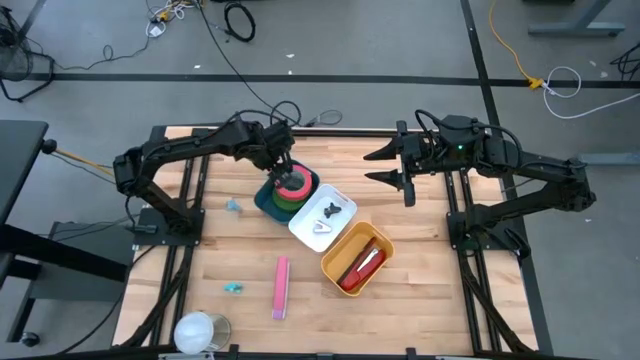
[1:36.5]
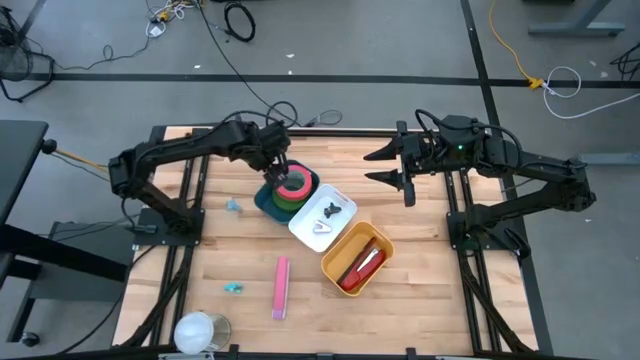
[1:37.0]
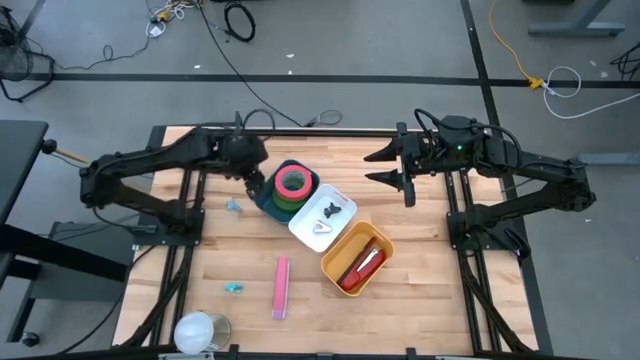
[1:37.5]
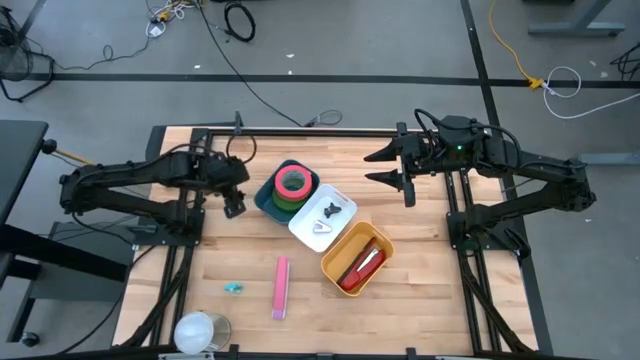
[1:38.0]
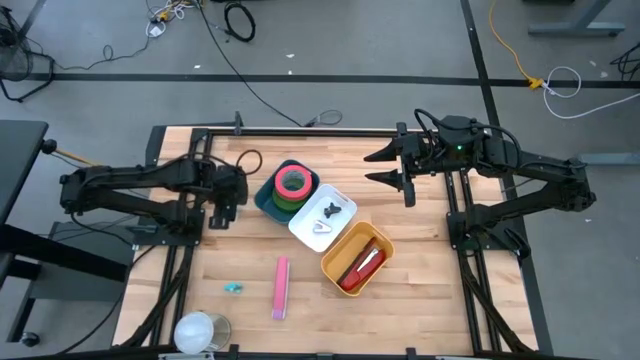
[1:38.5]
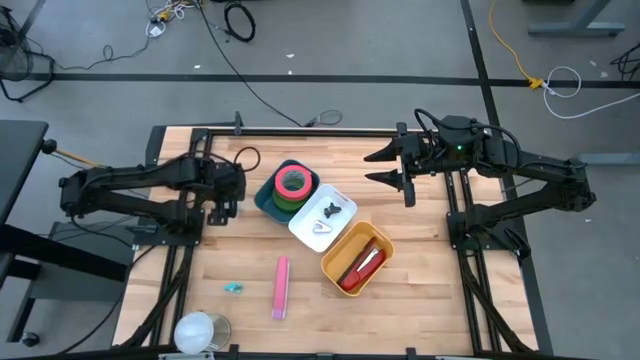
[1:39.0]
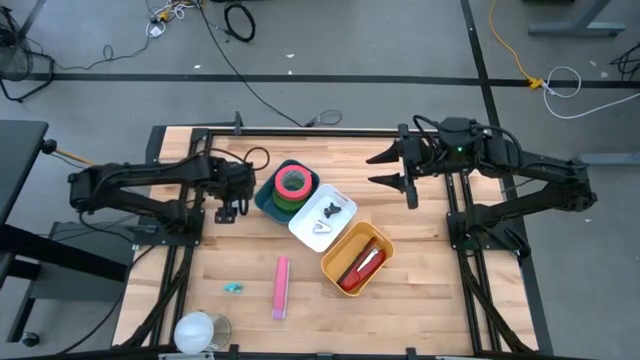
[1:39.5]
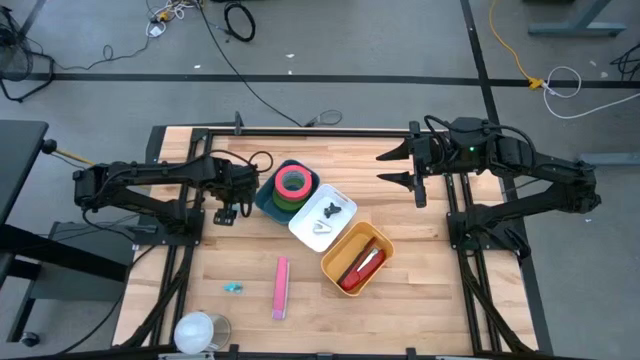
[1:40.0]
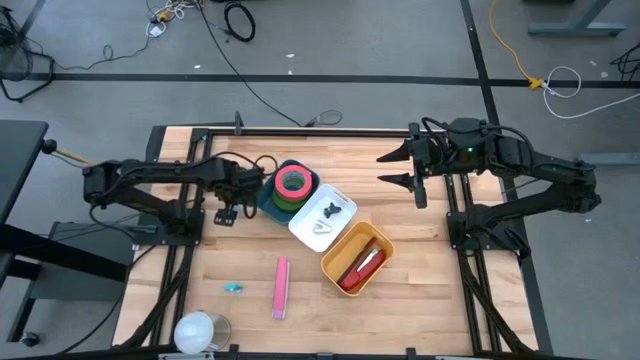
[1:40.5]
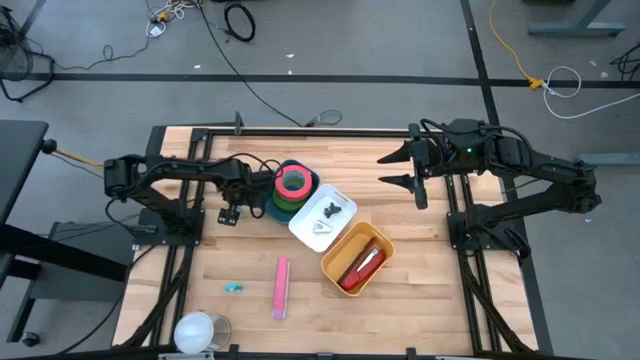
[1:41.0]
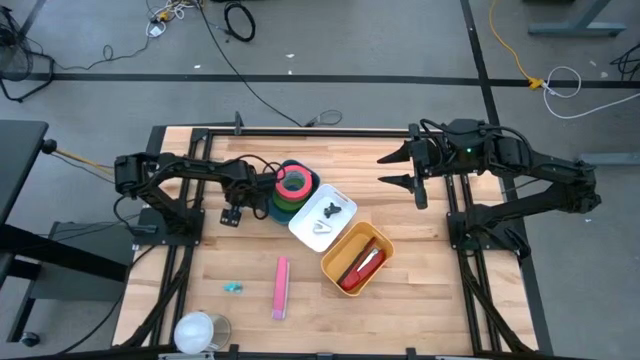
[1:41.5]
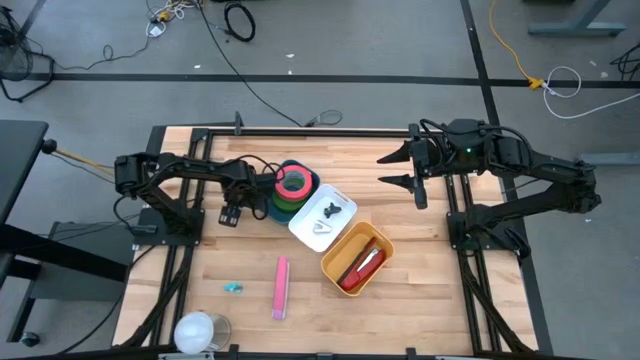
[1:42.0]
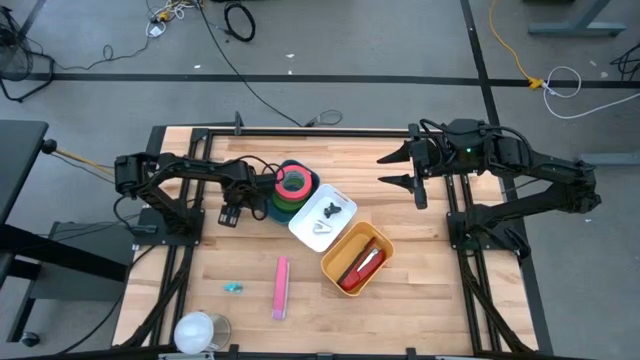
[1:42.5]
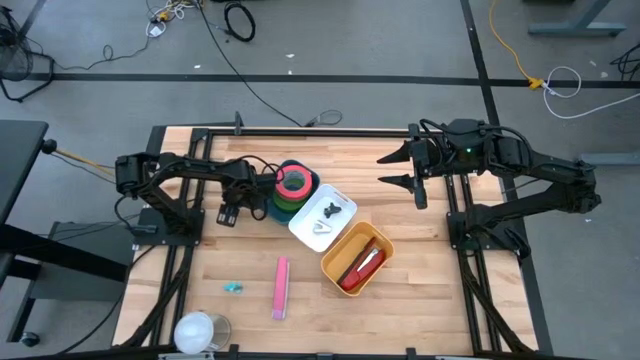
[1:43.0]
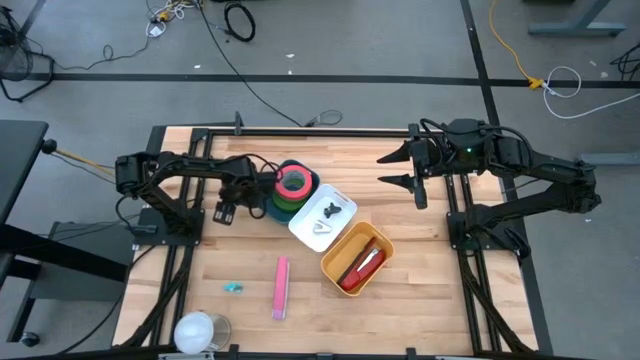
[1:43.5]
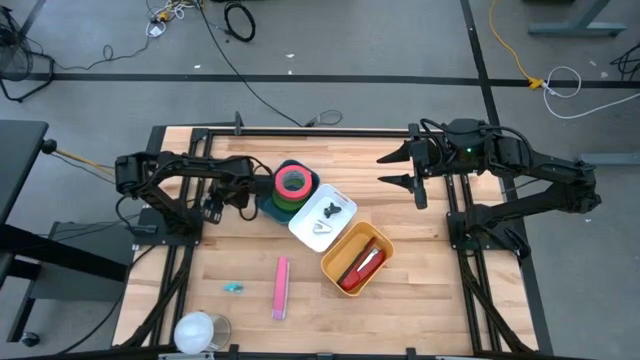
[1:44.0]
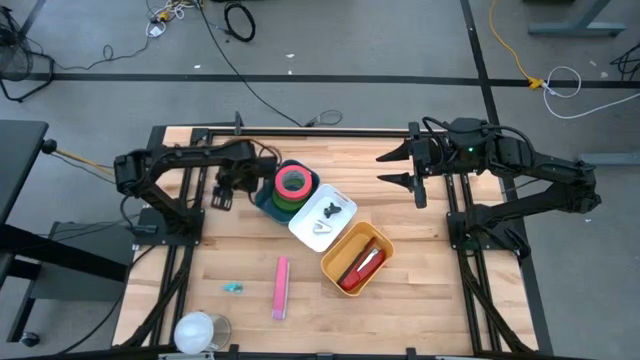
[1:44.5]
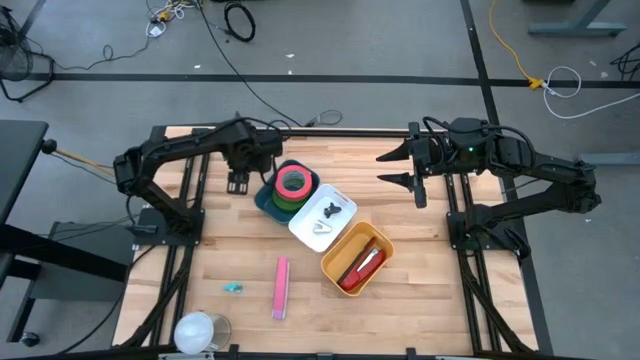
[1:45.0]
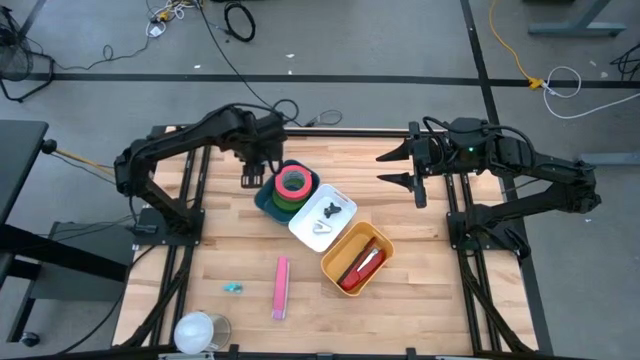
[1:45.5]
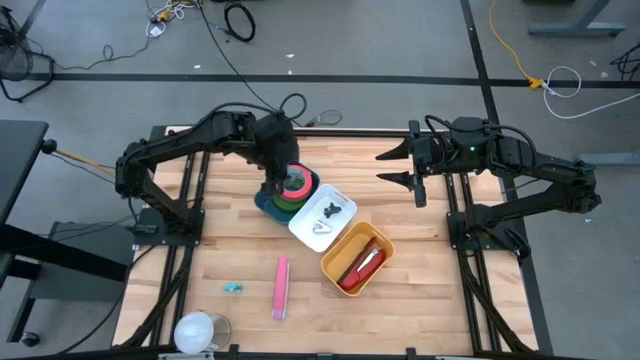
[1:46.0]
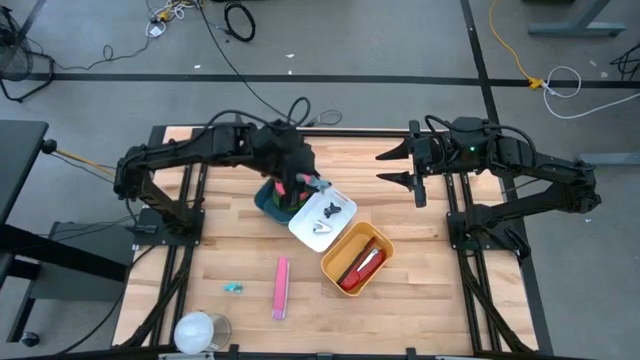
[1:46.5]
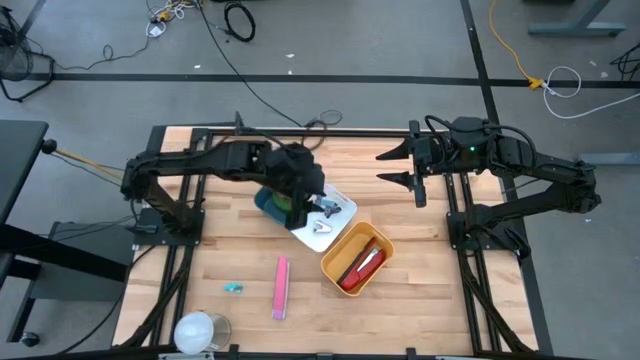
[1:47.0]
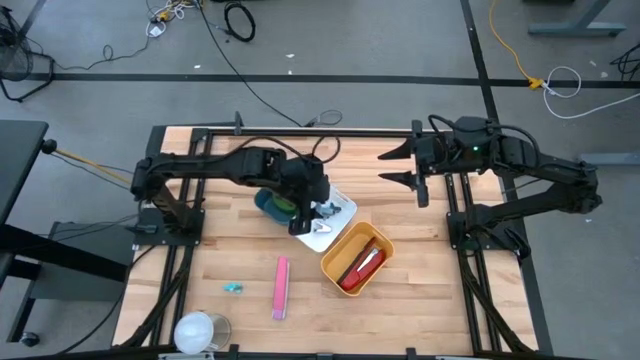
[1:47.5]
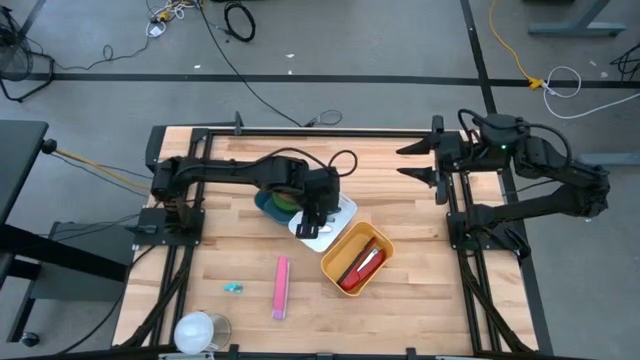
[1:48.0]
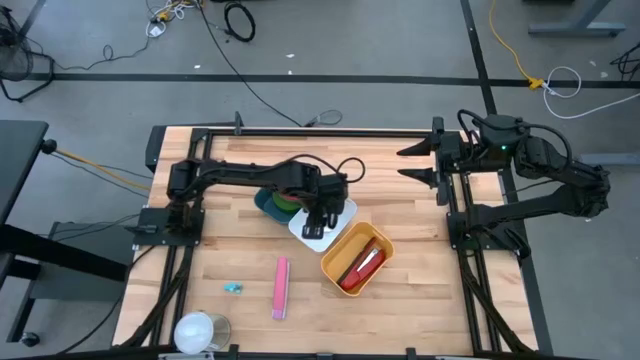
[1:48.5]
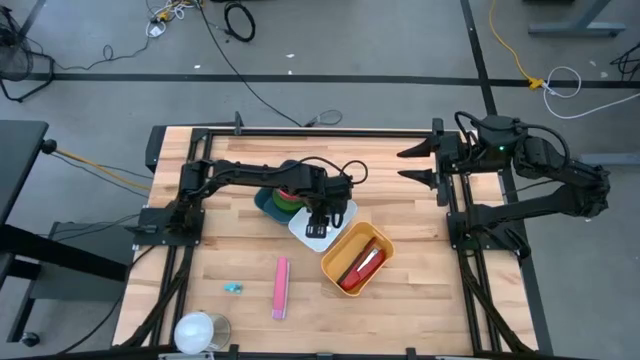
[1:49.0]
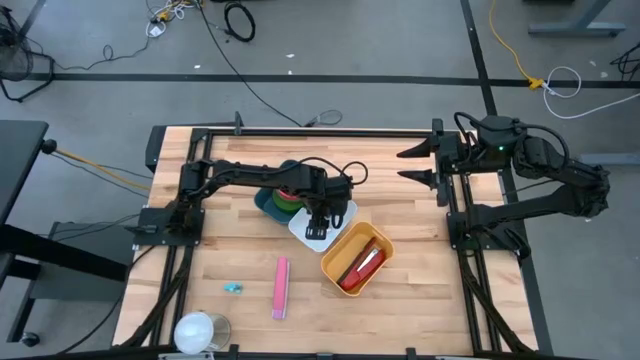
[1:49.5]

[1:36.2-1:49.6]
Task: Pick and place Stapler, Stapler remover, tape
Put the light blue staple remover into the white bin

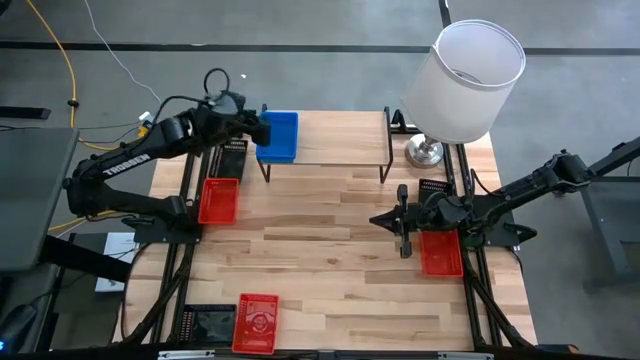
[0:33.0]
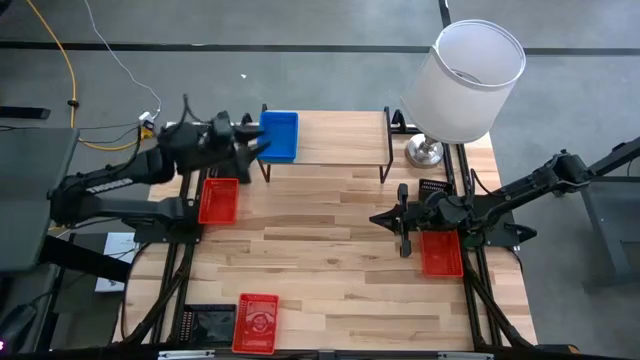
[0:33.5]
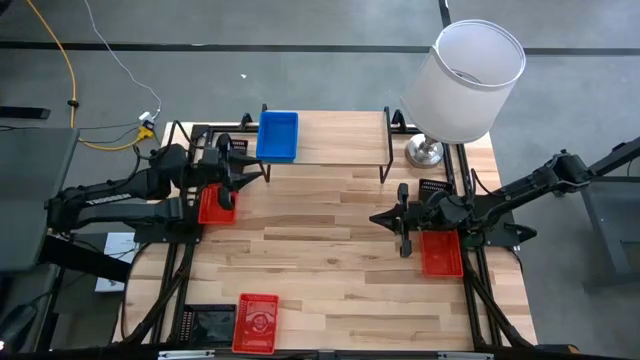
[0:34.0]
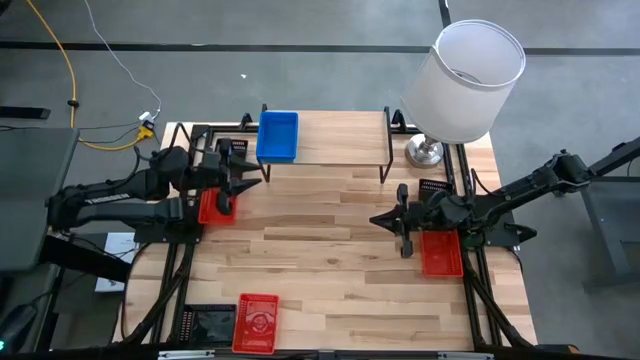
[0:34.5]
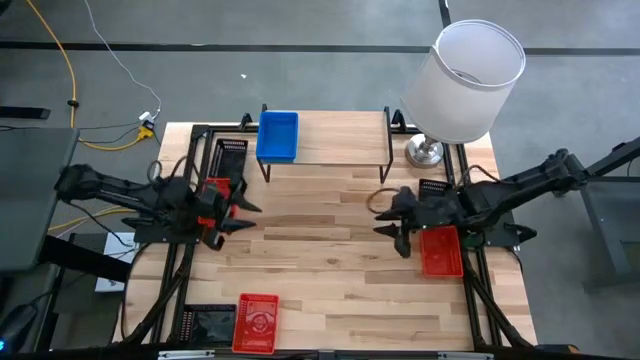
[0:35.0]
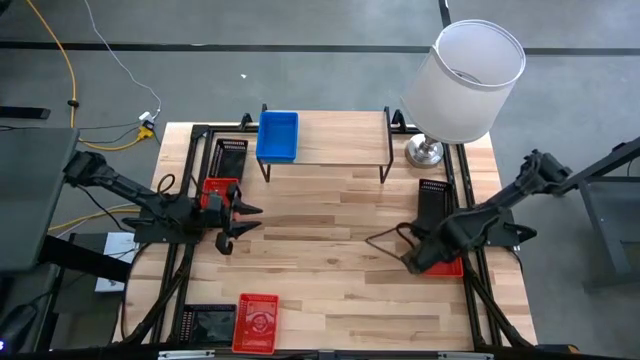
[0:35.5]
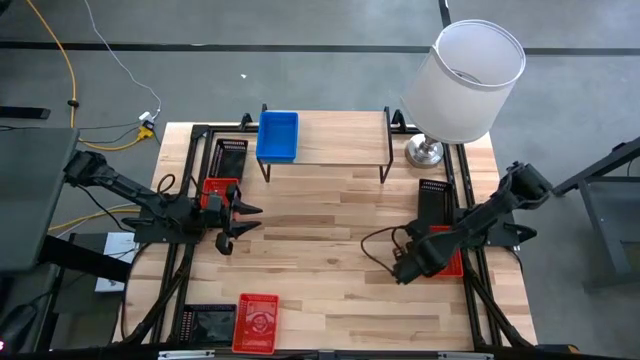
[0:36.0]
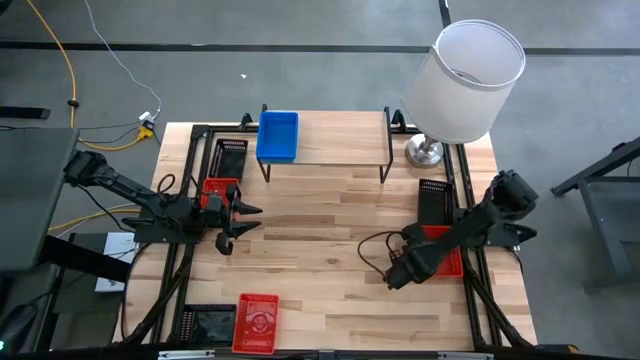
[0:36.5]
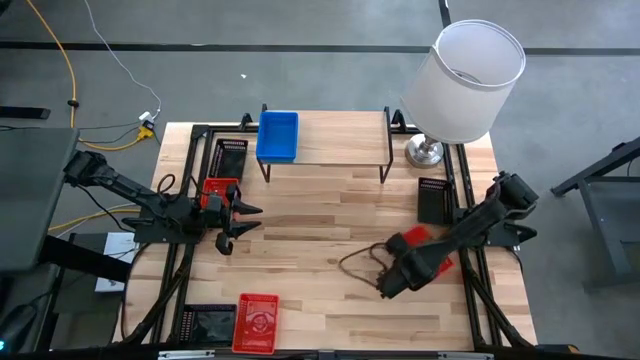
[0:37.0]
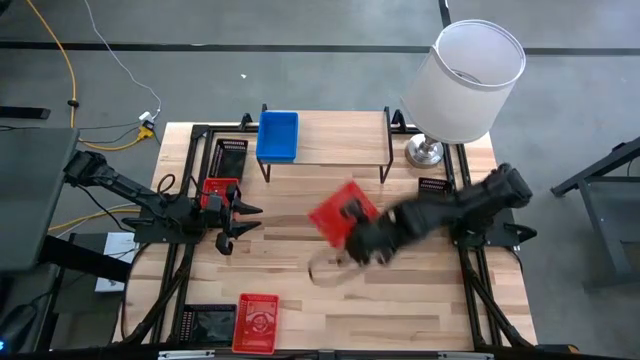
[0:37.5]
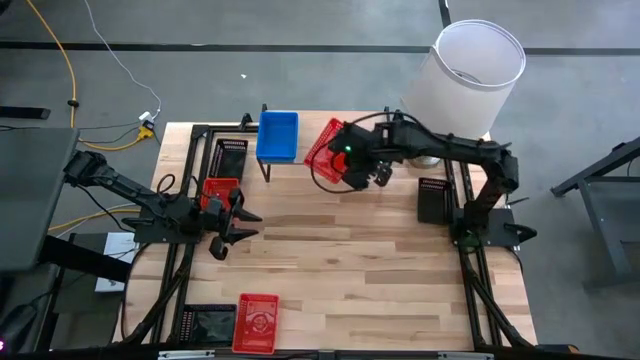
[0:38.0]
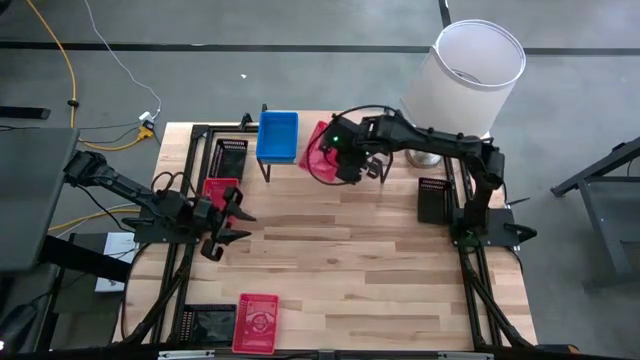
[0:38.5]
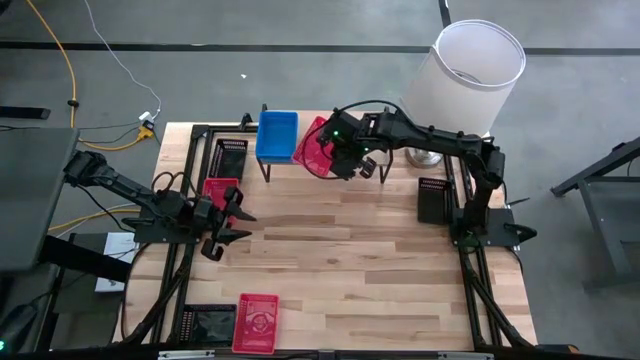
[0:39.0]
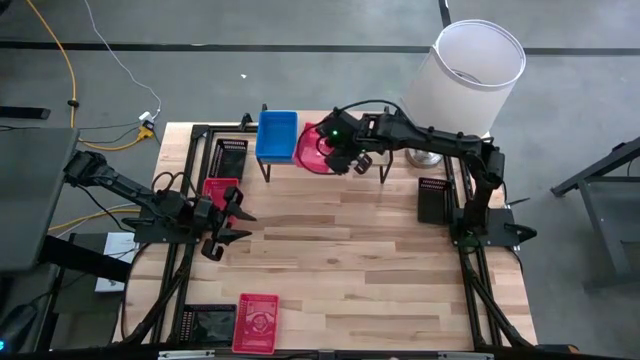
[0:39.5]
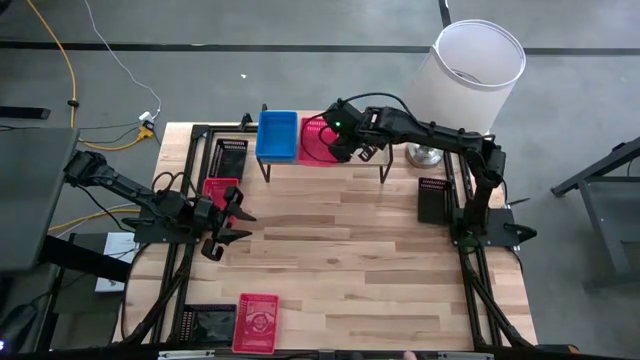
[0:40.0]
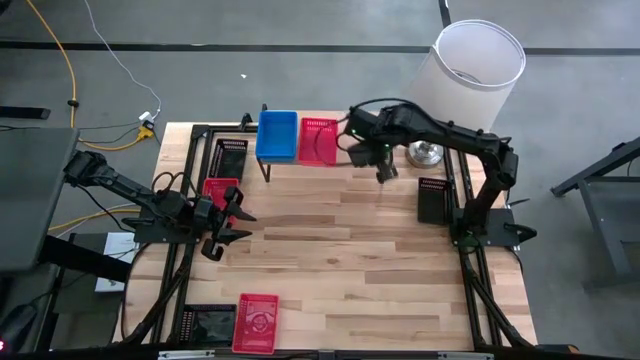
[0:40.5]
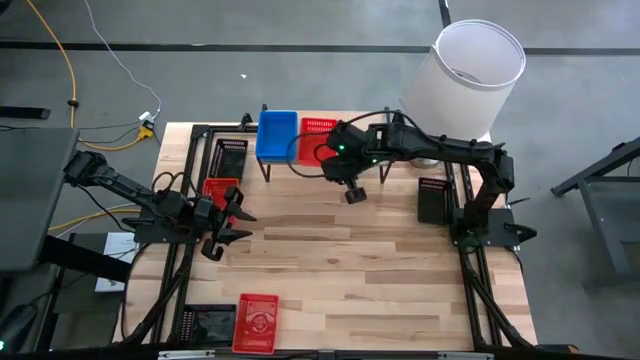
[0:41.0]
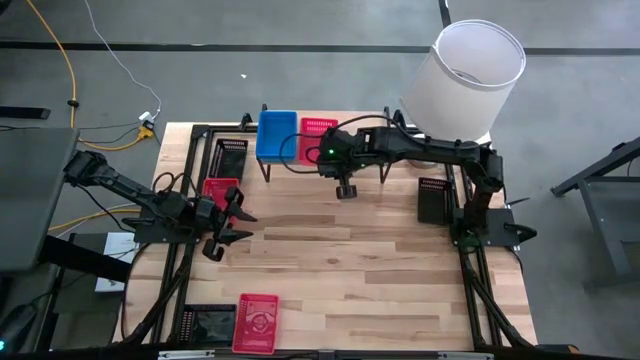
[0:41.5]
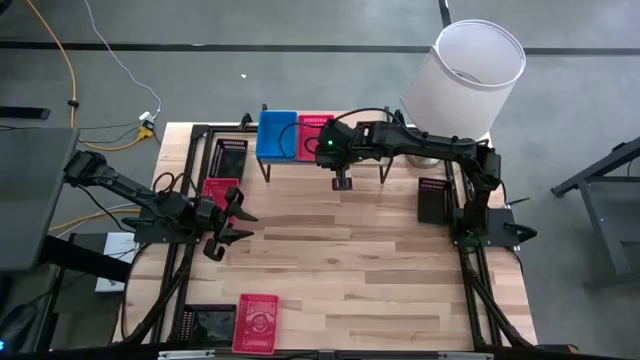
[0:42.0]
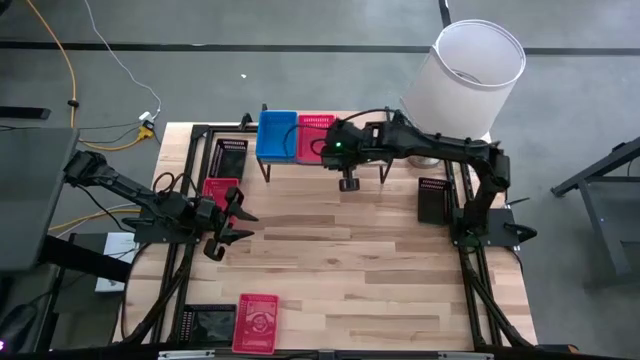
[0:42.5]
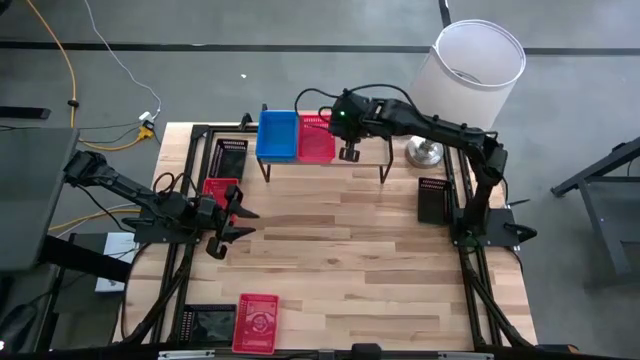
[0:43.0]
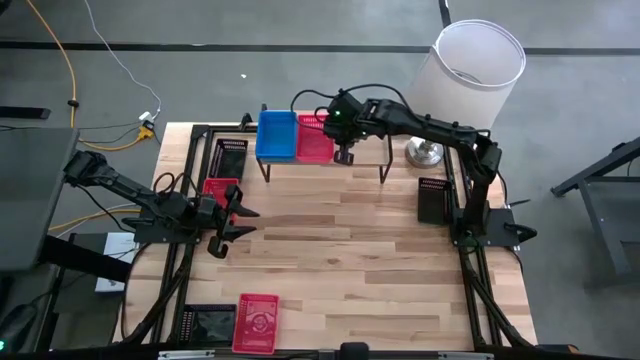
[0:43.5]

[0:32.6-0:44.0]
Task: Stack baskets on shelf by color
Put the middle red bin on the shelf
